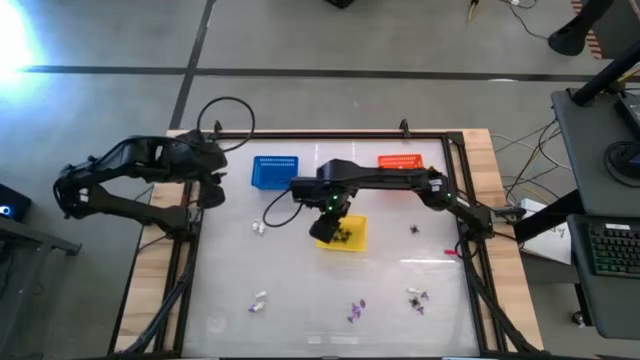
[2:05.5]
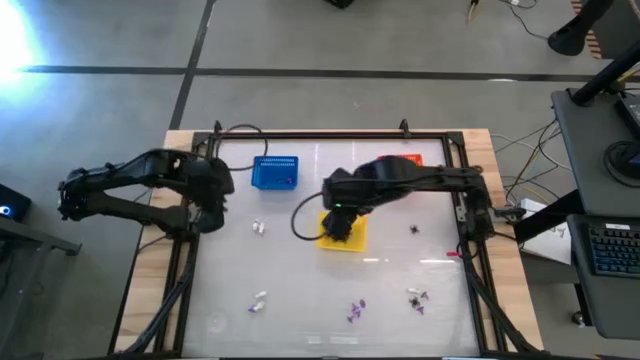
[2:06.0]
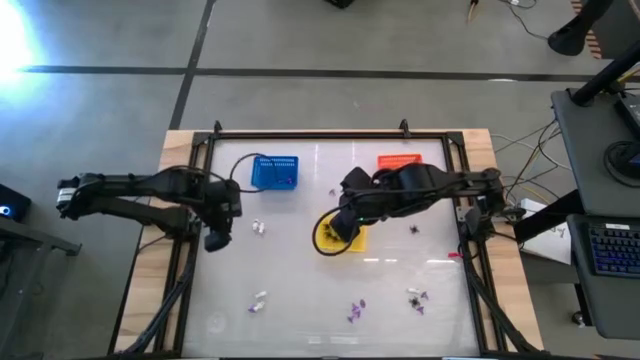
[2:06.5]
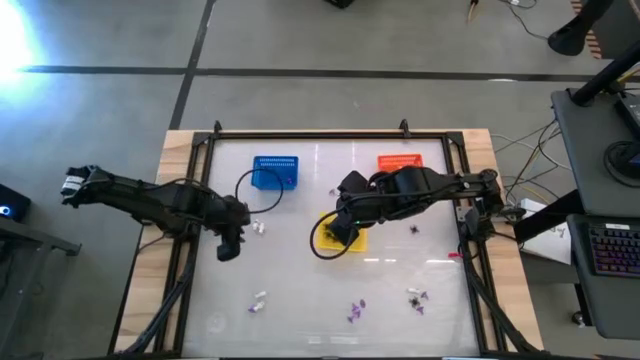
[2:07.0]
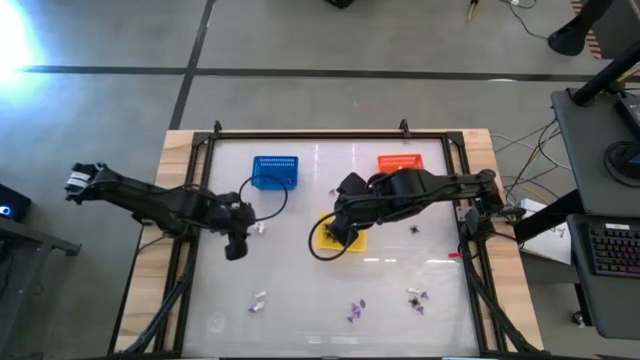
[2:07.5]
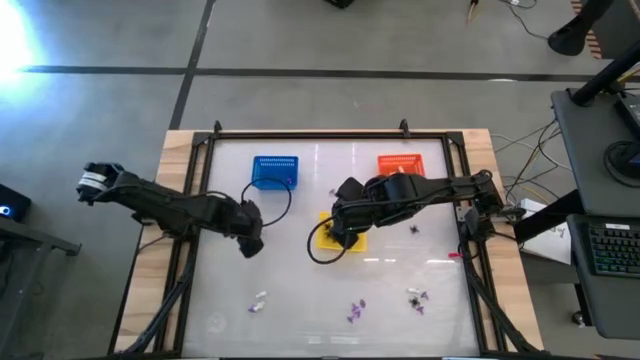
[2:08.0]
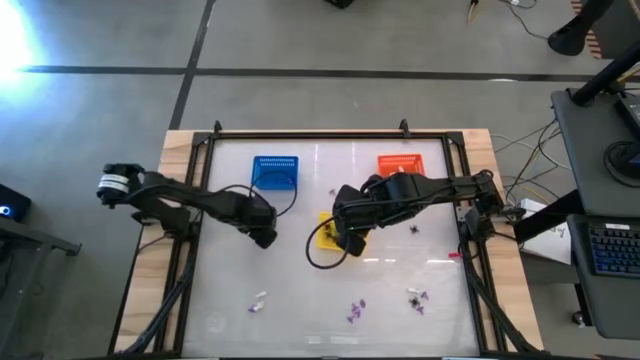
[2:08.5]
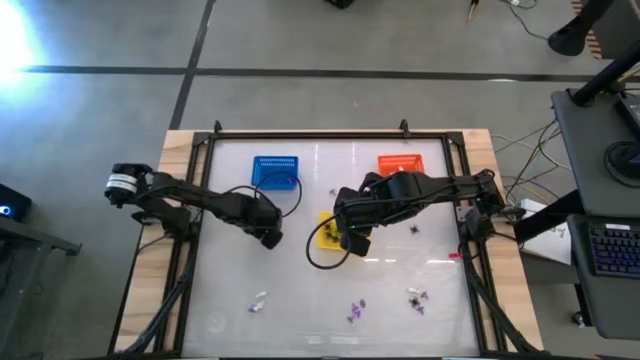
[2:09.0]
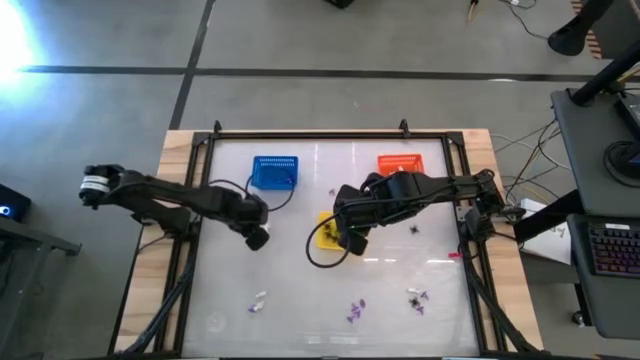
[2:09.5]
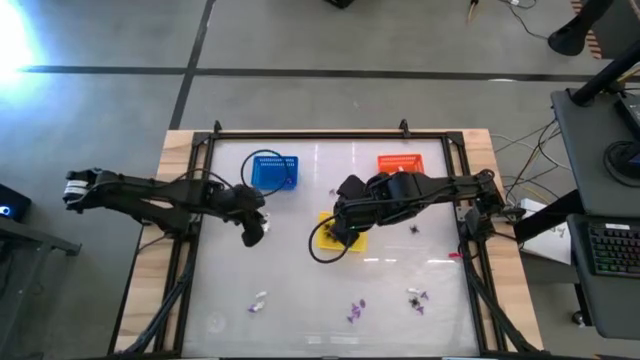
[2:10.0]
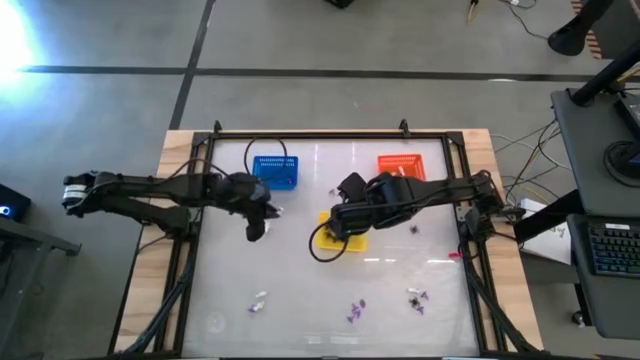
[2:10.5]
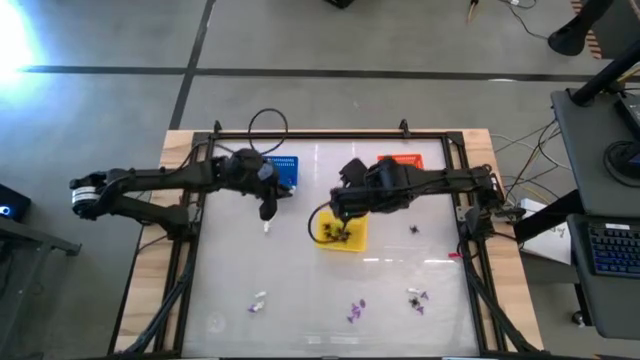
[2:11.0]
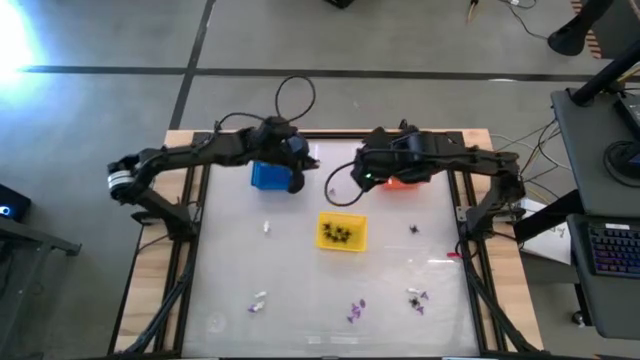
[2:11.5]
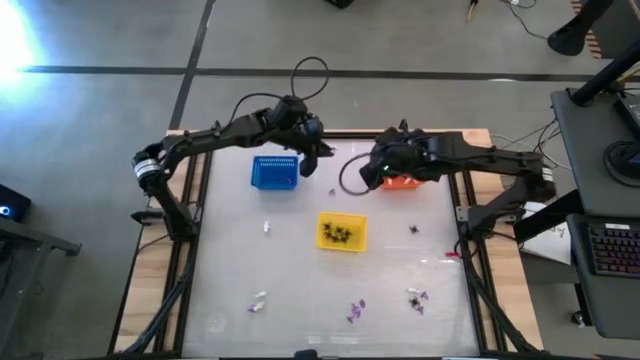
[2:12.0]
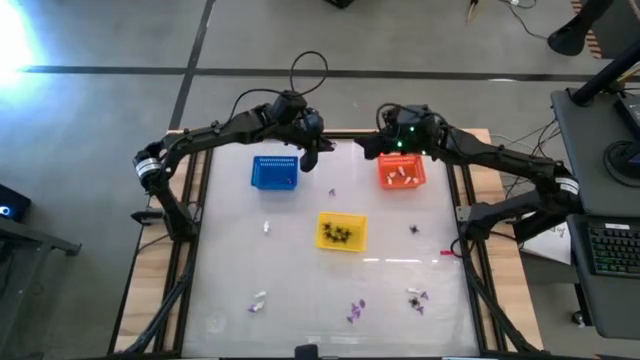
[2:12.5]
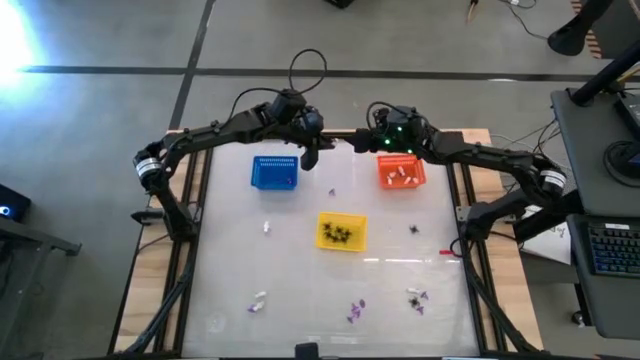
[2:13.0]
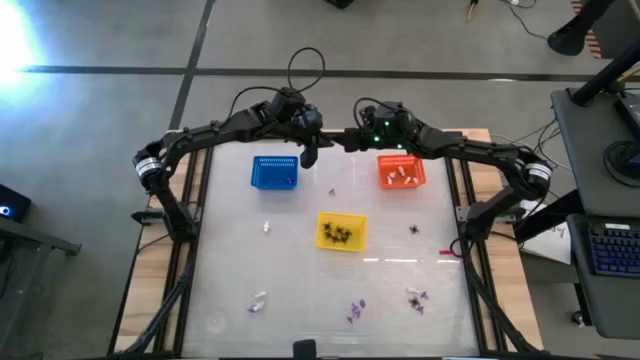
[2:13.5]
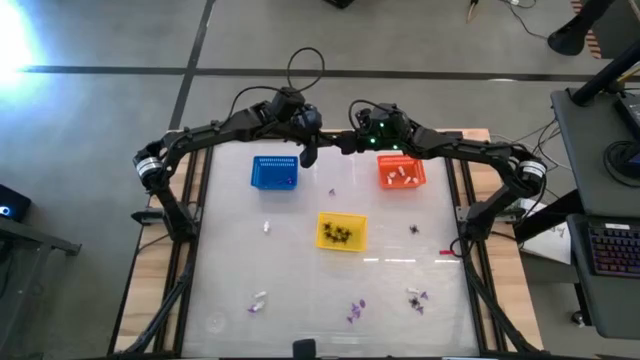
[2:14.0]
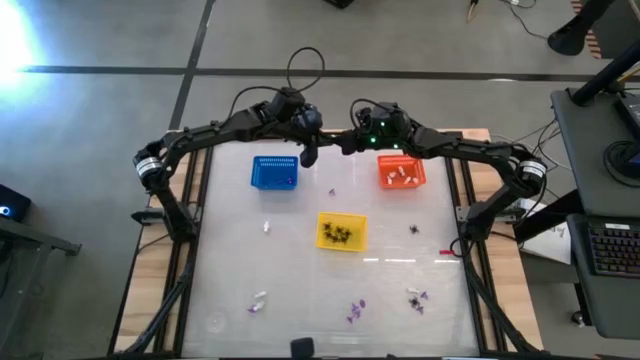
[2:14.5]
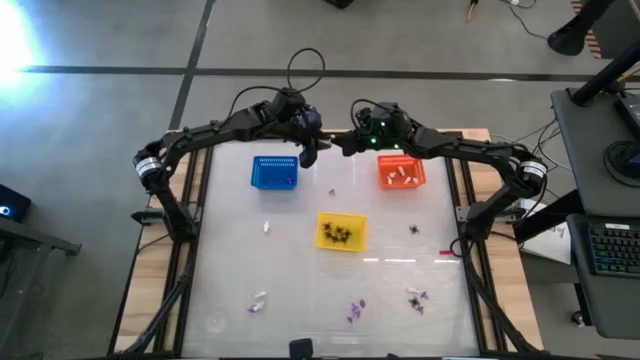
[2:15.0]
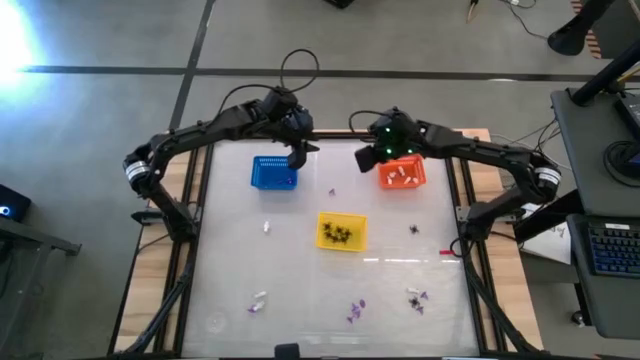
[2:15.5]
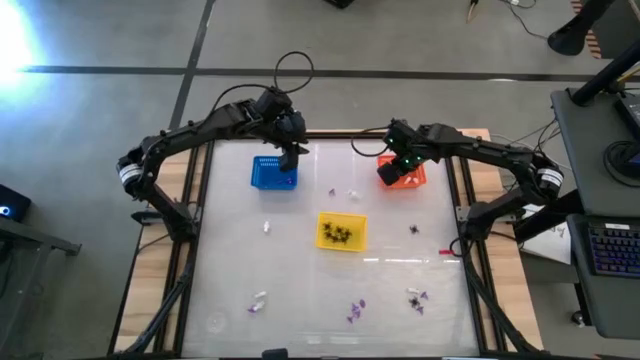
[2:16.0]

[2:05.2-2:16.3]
Task: Sort Halloween decoration
Put the white skeleton toy into the orange bin

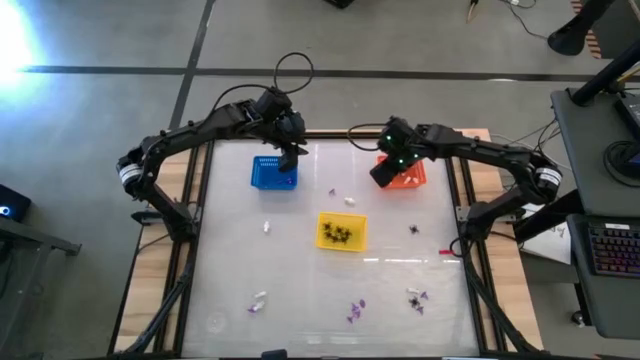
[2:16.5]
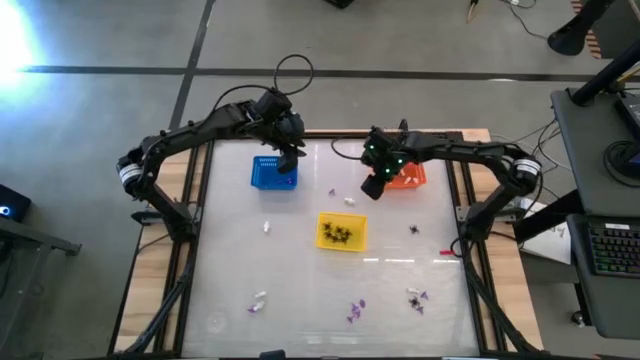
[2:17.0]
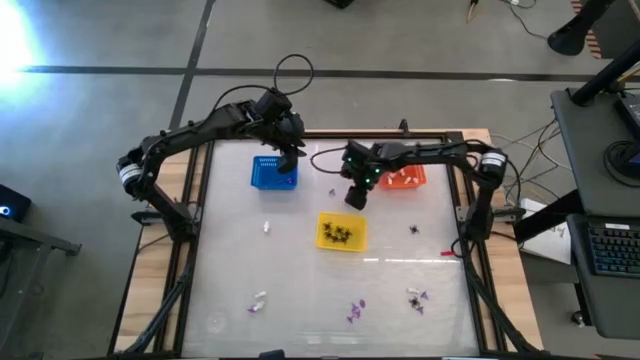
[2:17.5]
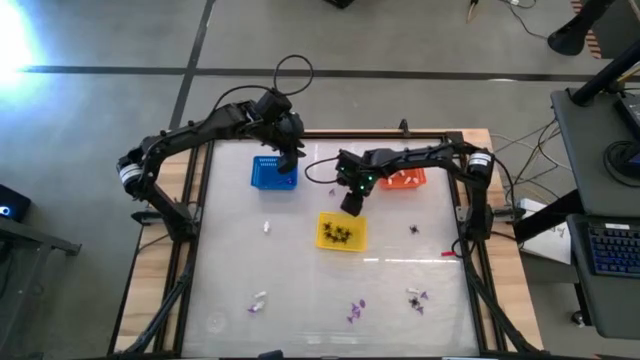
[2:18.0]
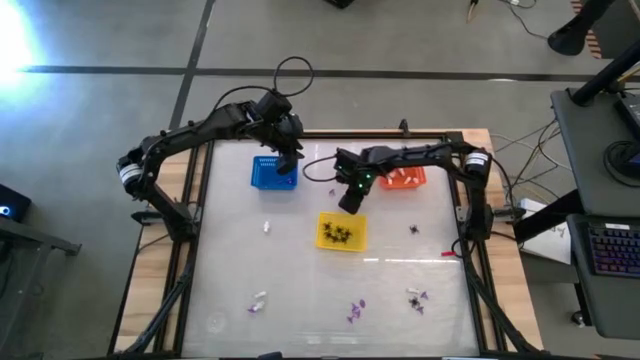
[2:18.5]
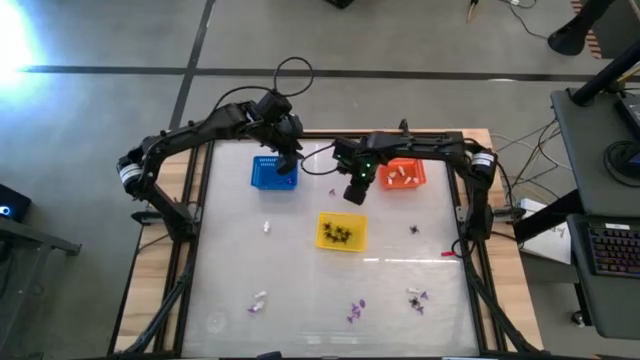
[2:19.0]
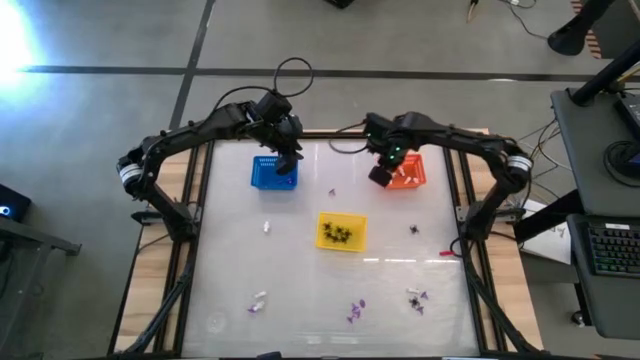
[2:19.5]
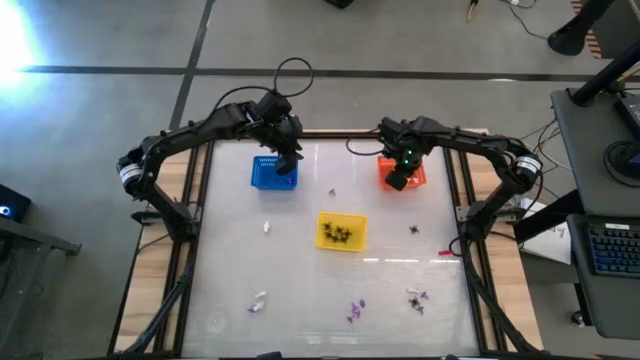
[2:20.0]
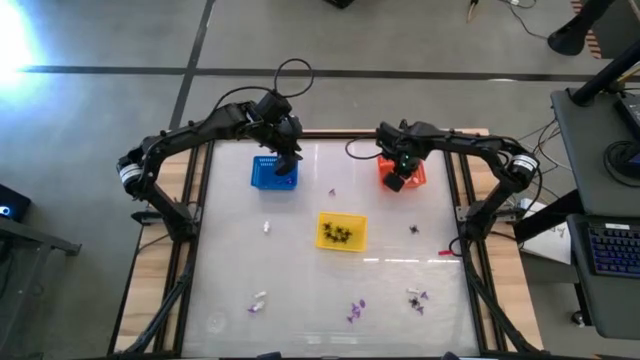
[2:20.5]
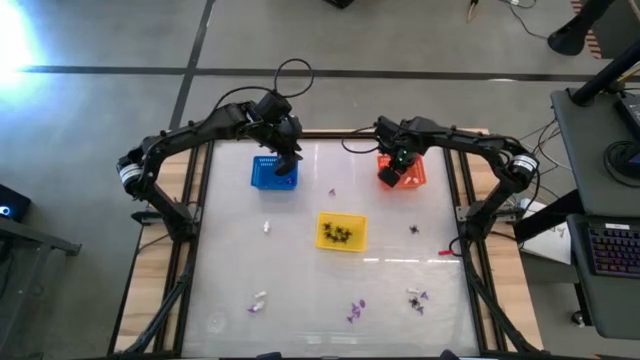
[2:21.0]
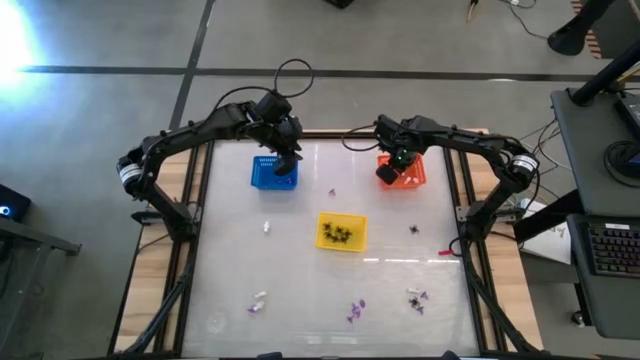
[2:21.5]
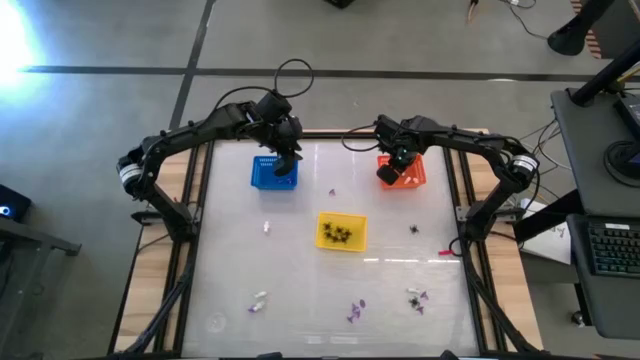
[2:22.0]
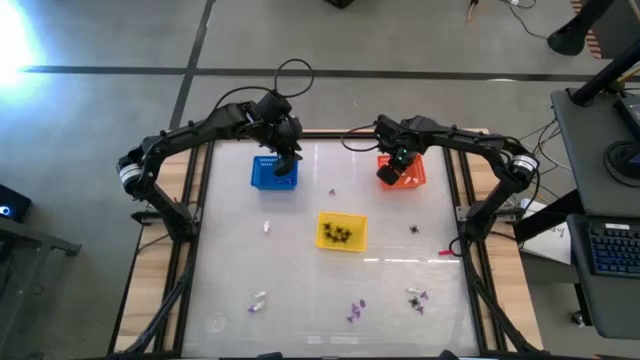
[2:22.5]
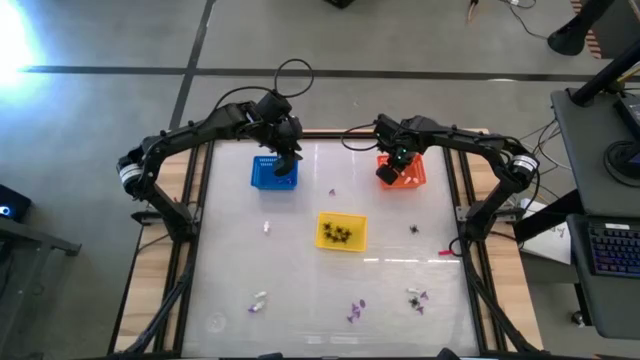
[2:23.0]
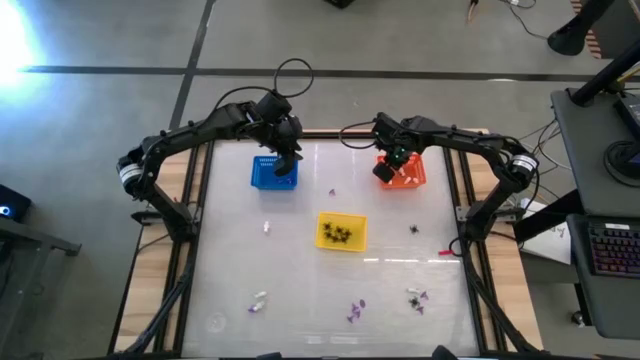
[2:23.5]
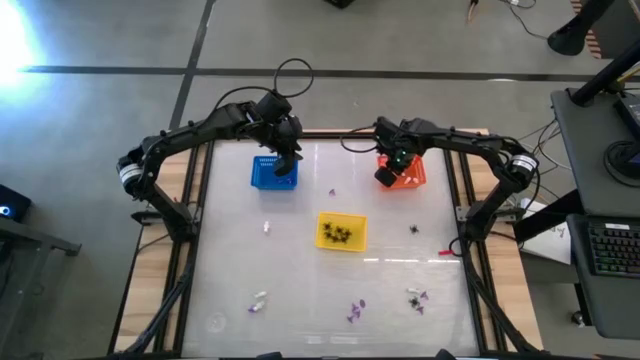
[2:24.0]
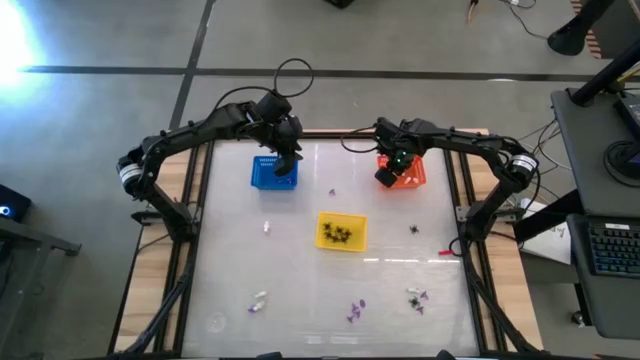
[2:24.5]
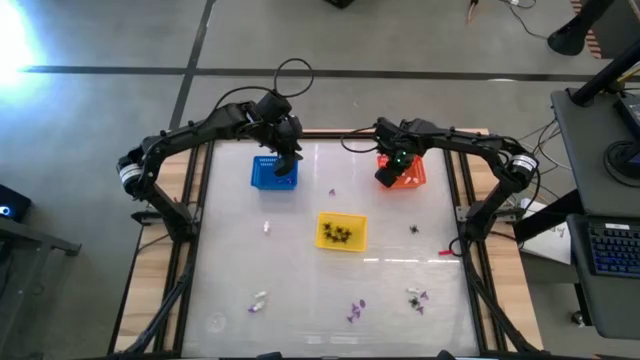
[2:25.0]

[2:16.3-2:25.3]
Put the white skeleton toy into the orange bin

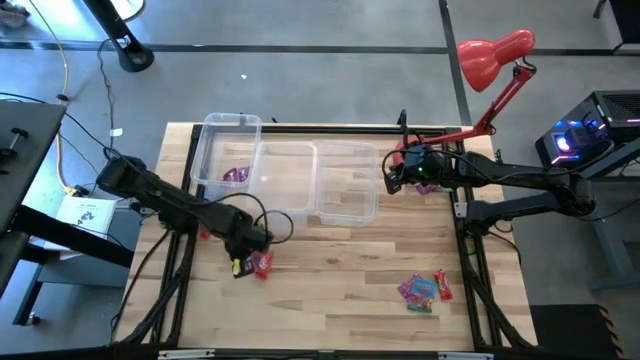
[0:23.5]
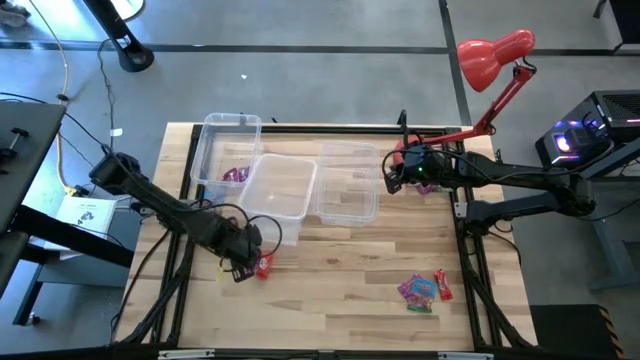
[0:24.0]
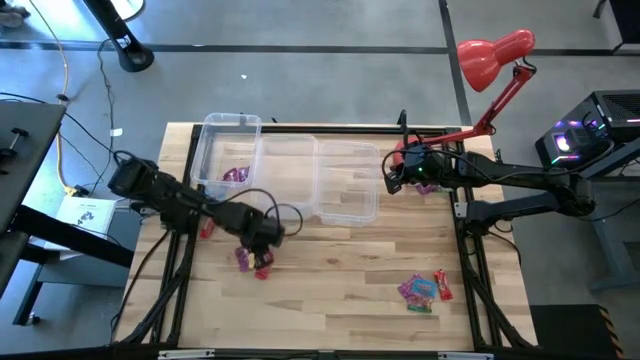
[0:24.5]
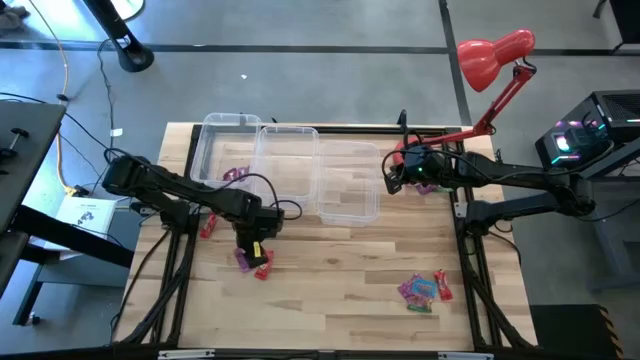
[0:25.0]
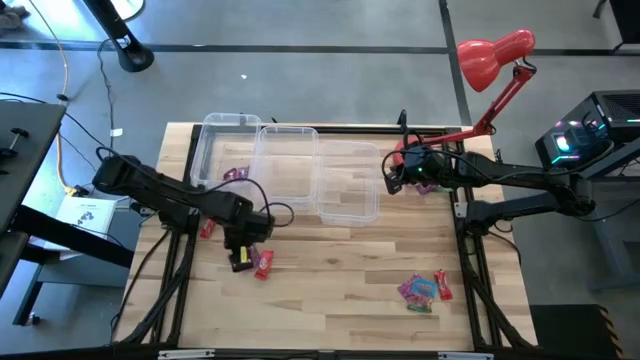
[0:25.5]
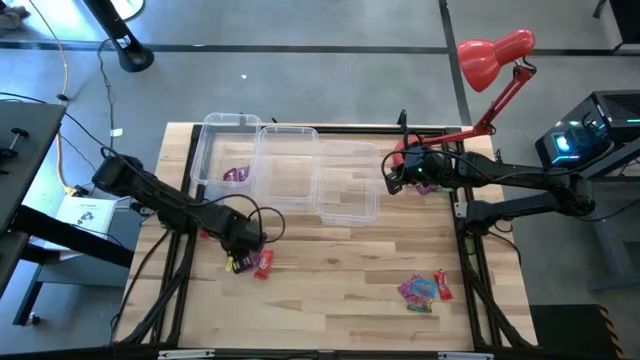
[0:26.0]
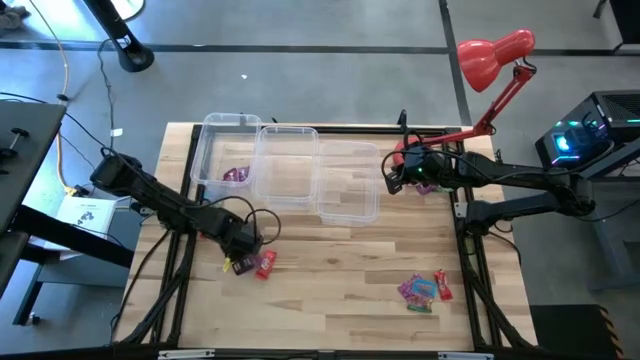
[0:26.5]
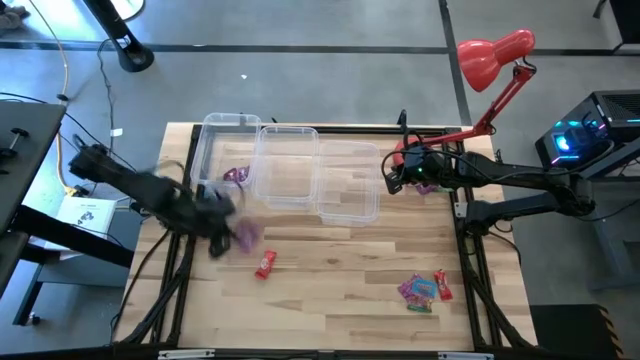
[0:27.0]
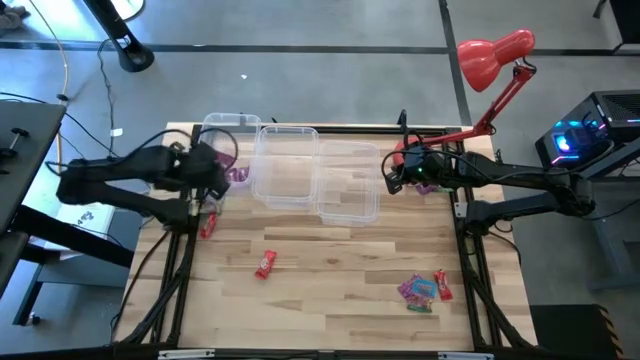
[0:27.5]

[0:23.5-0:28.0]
Task: Sort candy
Put the bottom violet candy wrapper into the left transparent bin
